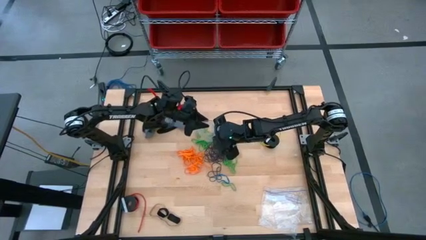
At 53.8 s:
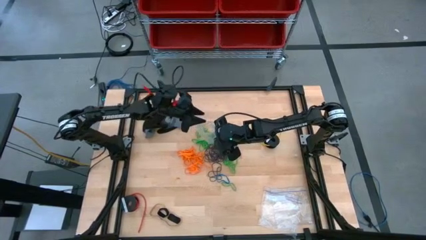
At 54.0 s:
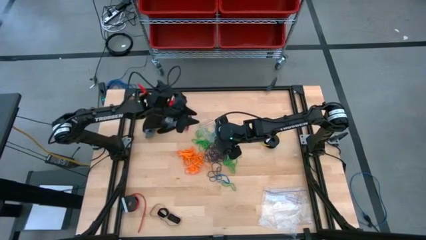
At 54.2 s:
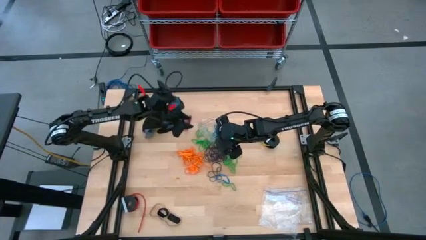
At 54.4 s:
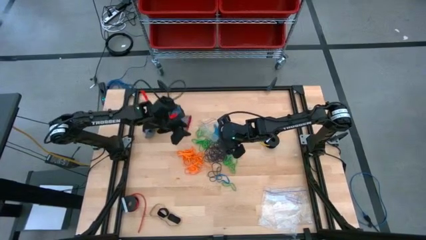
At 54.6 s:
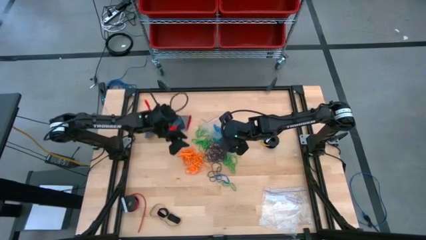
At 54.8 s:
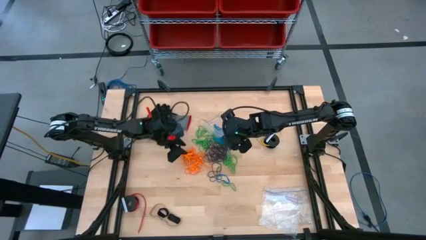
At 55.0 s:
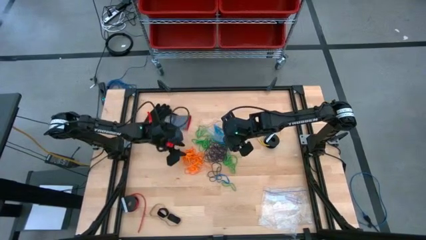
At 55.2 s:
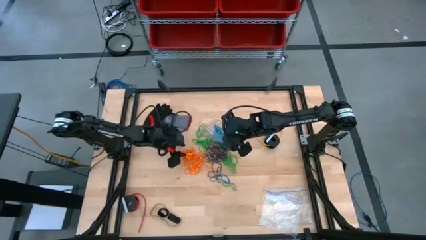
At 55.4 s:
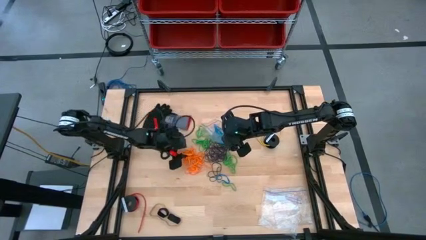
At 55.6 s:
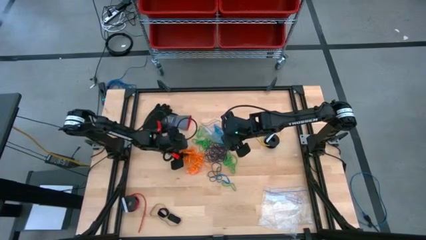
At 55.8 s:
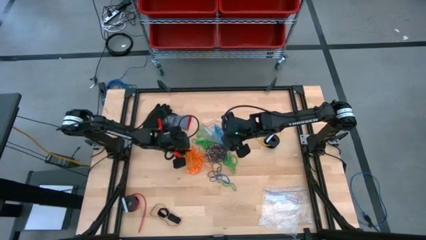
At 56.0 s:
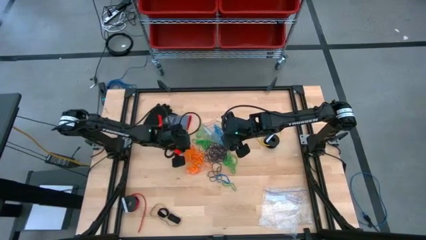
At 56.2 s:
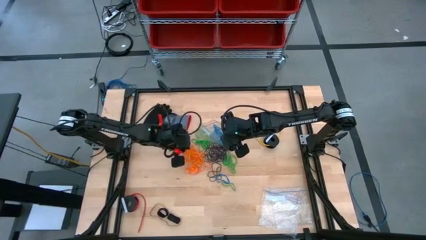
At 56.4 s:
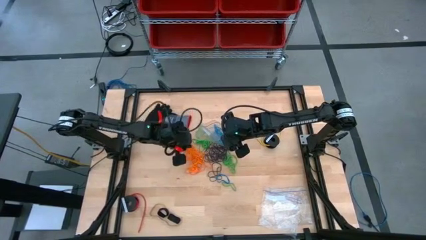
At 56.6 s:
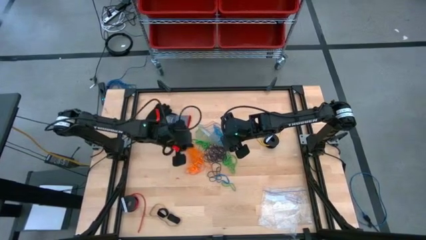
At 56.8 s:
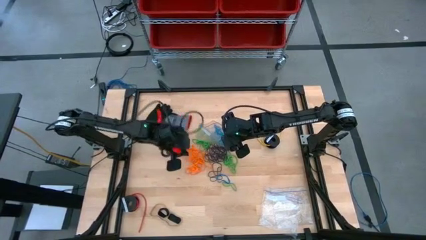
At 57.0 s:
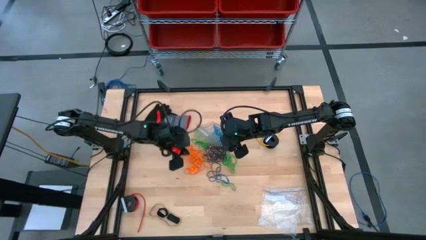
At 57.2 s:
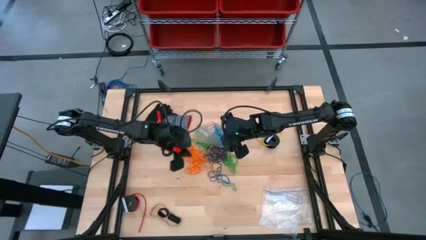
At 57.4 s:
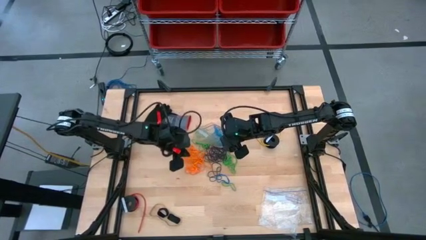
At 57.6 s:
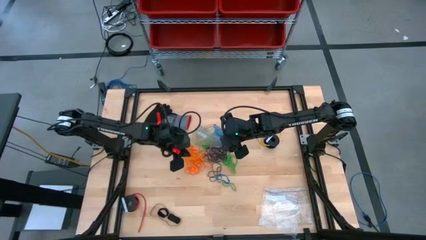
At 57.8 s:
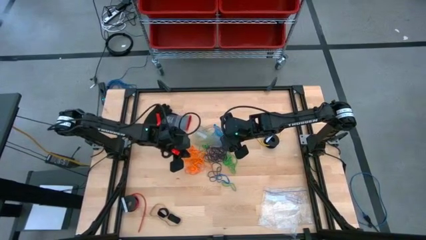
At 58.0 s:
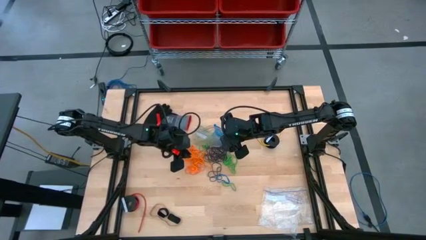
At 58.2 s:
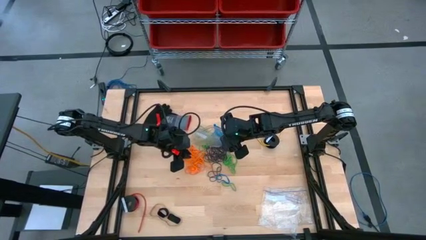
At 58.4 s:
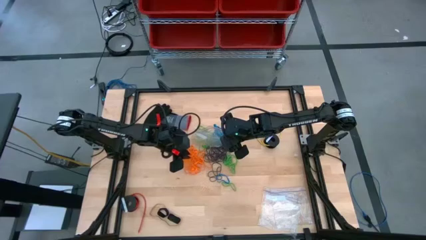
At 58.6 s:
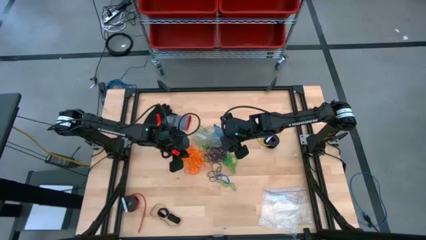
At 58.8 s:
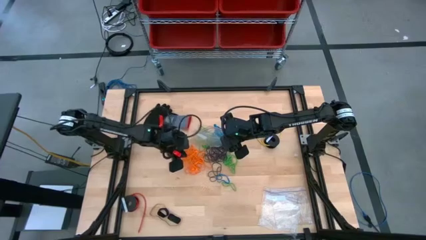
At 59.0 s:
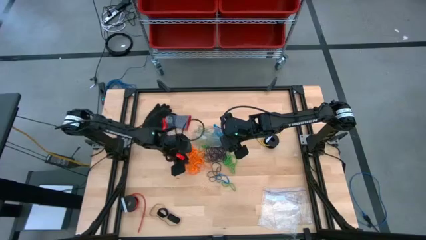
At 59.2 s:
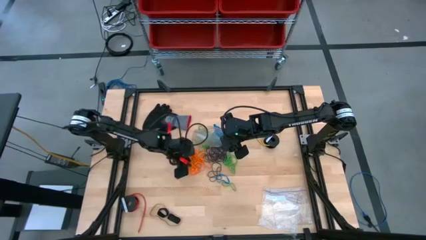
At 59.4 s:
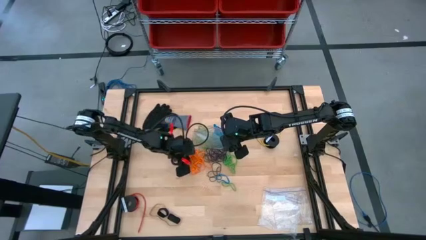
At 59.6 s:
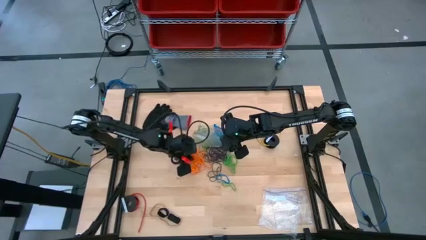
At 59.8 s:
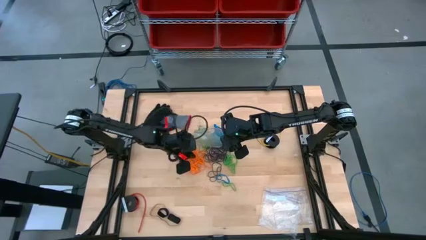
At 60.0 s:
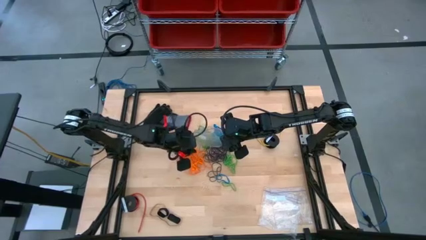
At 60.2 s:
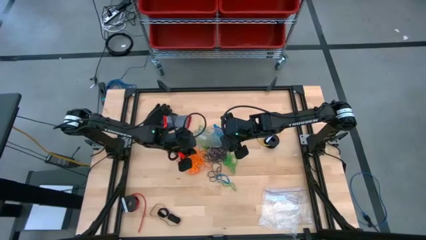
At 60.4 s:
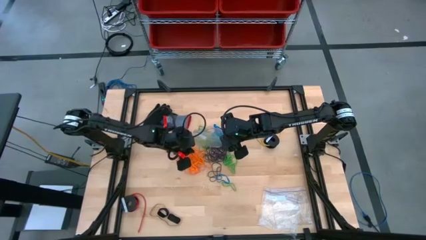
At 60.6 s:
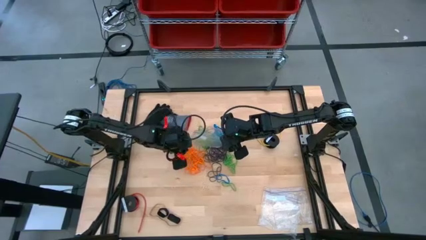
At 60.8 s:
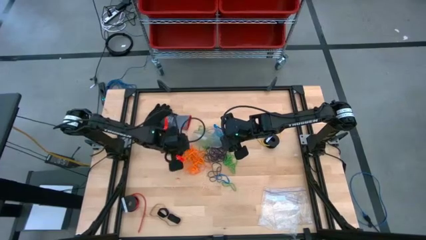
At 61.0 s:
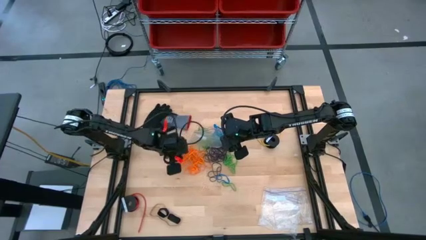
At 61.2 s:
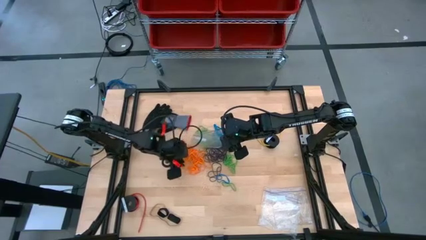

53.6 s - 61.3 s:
Task: Sort rubber bands
Put the orange rubber band into the transparent zip bag

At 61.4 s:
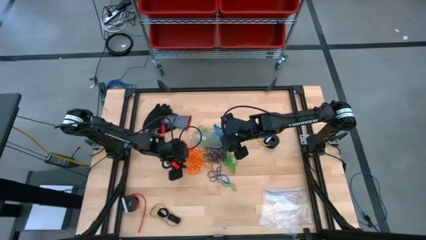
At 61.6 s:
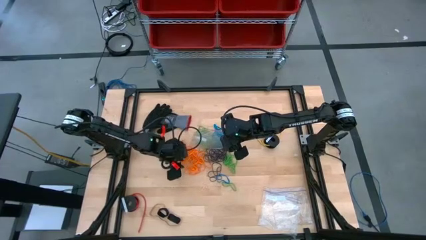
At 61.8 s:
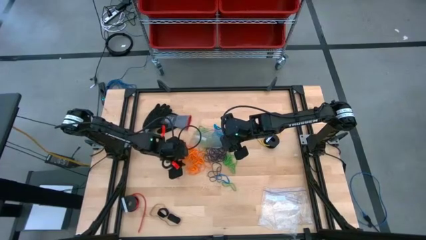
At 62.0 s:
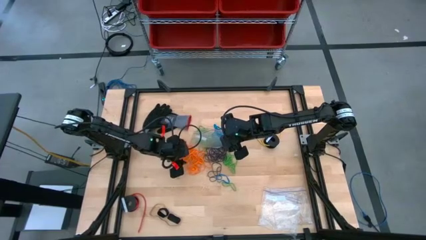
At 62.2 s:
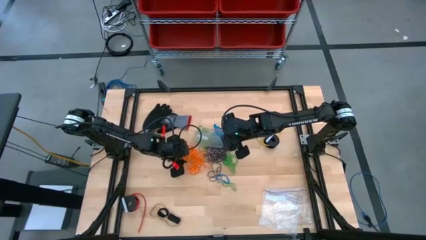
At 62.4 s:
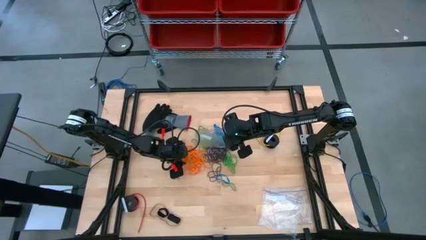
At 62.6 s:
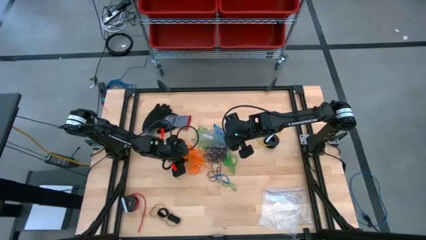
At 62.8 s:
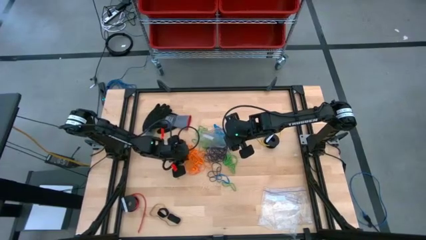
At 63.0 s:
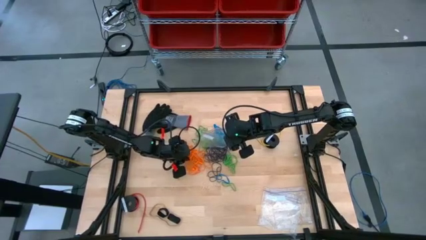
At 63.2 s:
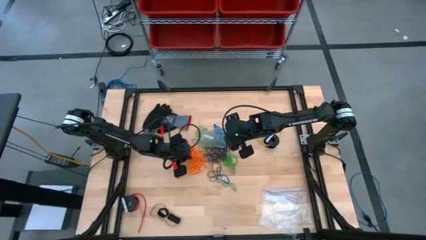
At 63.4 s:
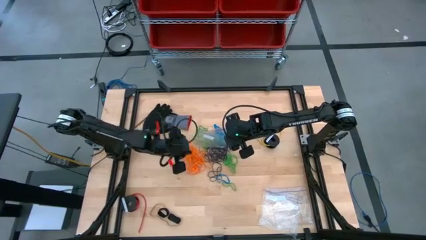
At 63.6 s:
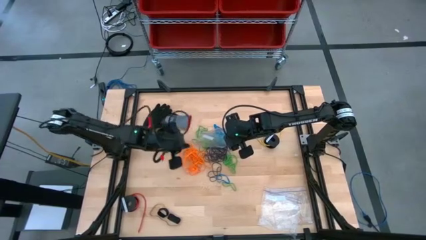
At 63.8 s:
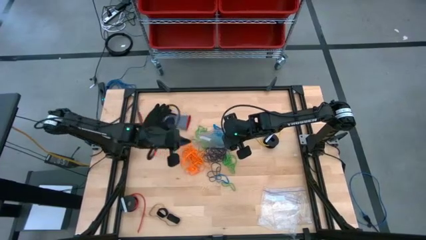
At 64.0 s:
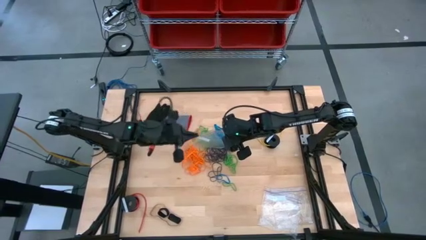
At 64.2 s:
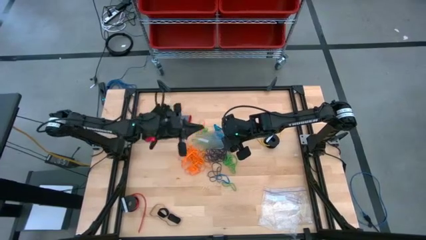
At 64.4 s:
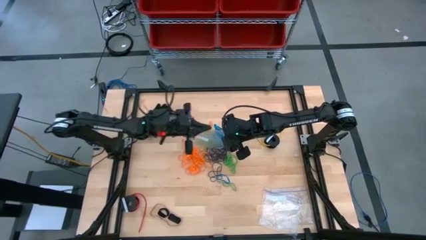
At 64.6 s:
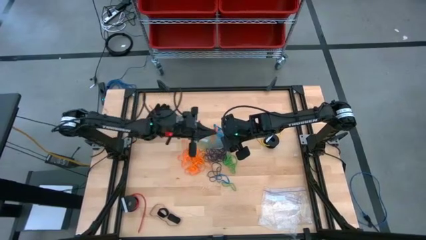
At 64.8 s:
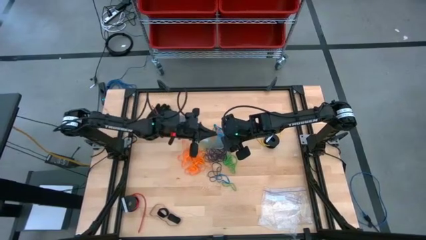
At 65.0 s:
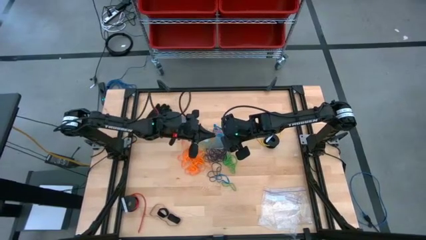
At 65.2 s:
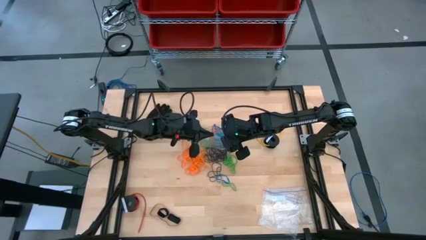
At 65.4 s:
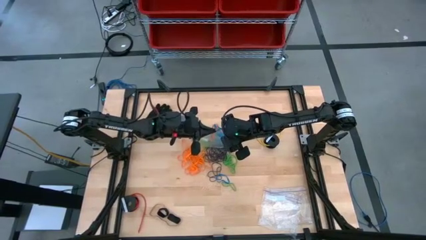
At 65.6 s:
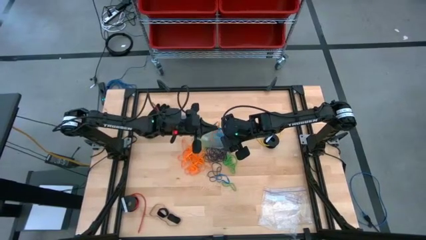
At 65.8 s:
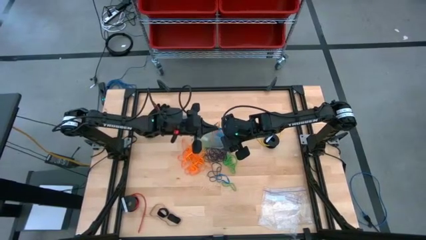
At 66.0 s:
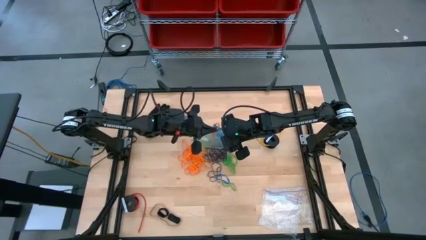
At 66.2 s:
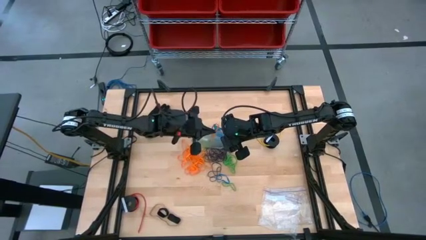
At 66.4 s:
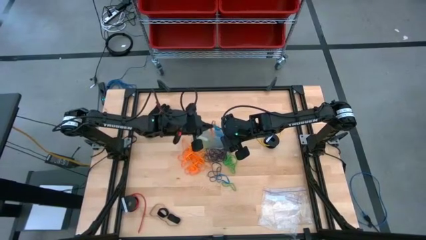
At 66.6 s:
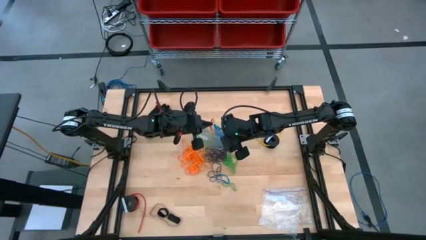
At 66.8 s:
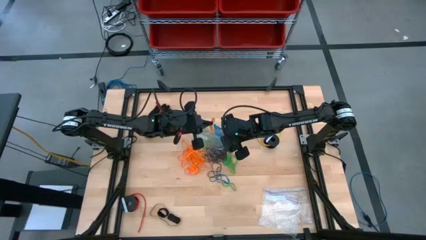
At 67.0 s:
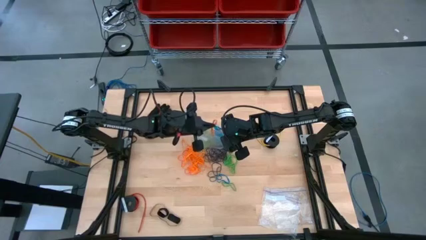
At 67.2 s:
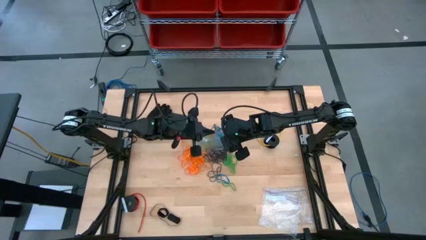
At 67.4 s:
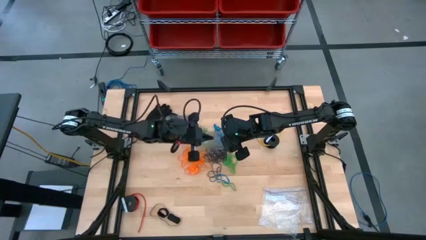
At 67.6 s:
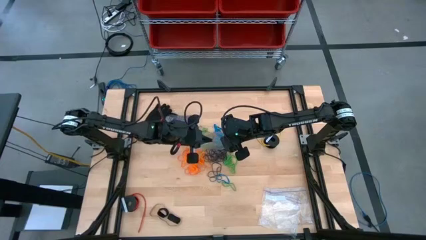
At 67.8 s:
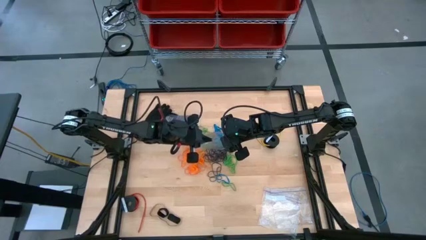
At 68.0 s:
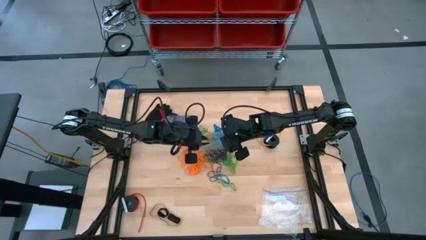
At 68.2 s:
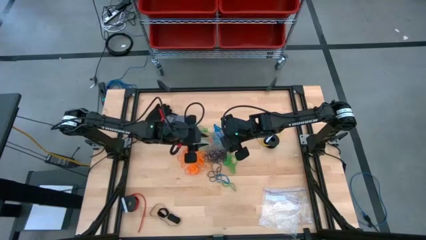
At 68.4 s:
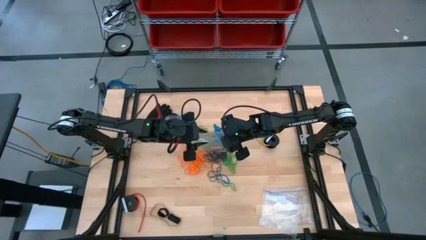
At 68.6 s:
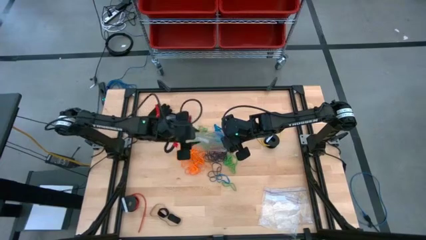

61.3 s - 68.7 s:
Put the orange rubber band into the transparent zip bag
